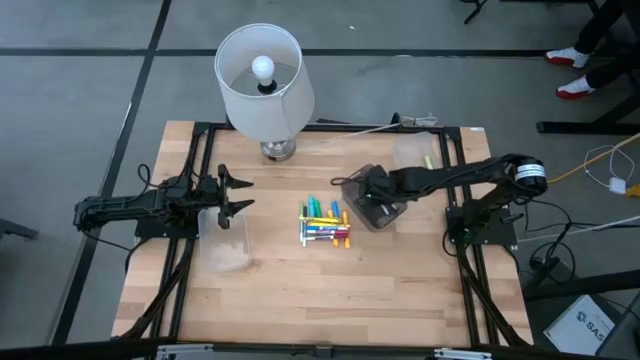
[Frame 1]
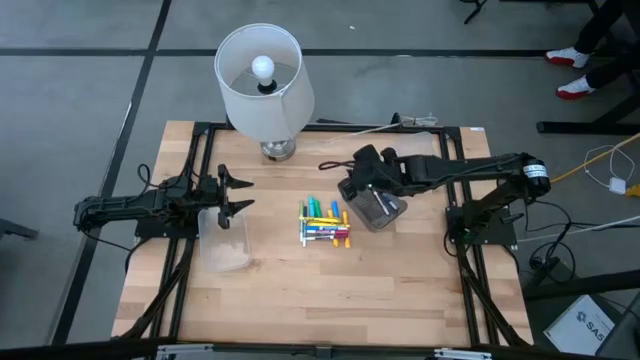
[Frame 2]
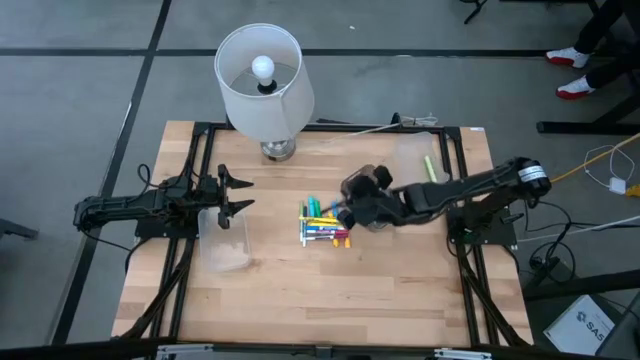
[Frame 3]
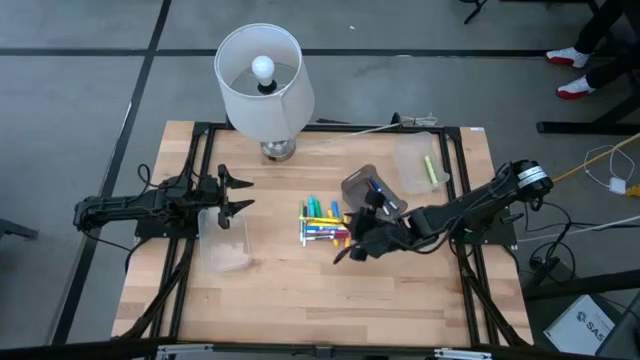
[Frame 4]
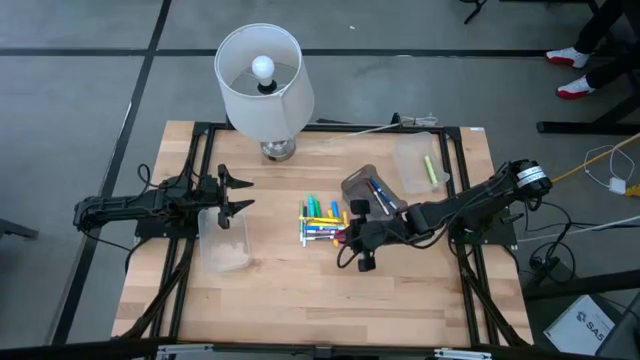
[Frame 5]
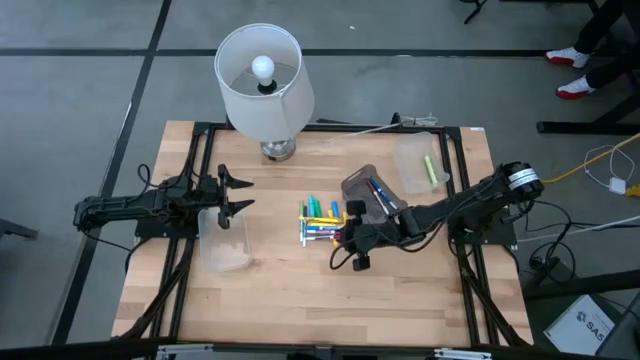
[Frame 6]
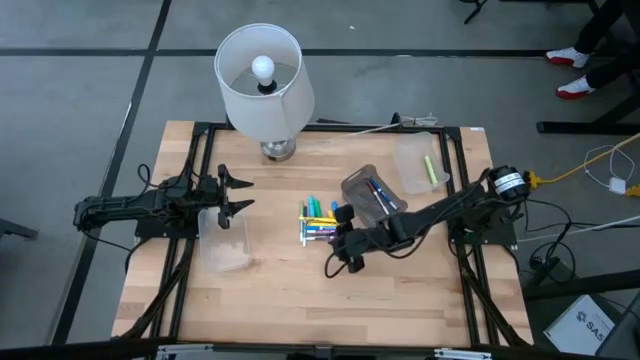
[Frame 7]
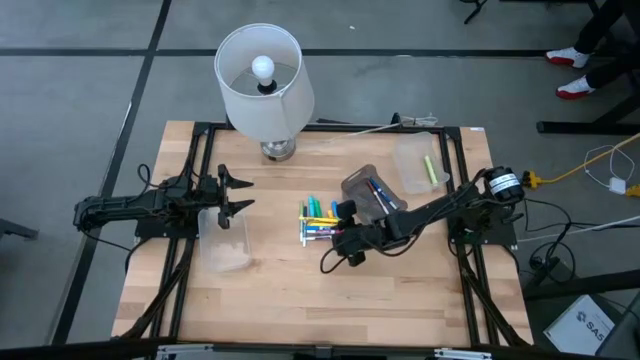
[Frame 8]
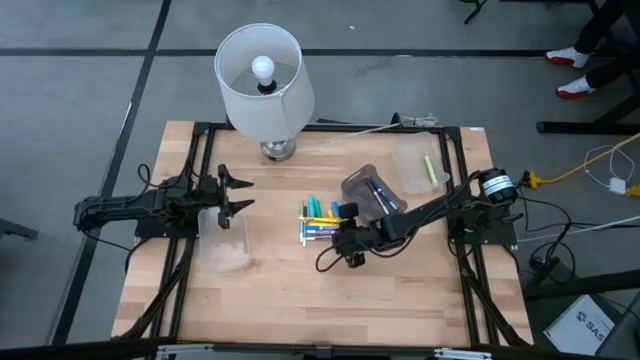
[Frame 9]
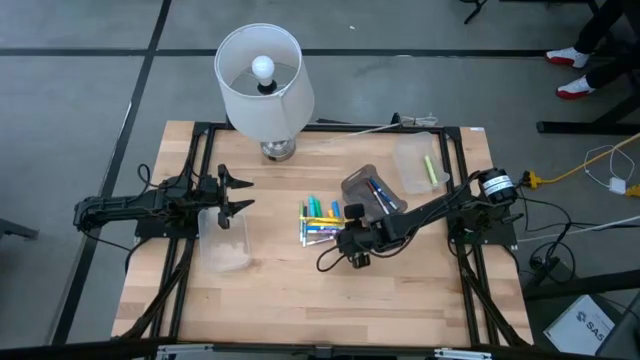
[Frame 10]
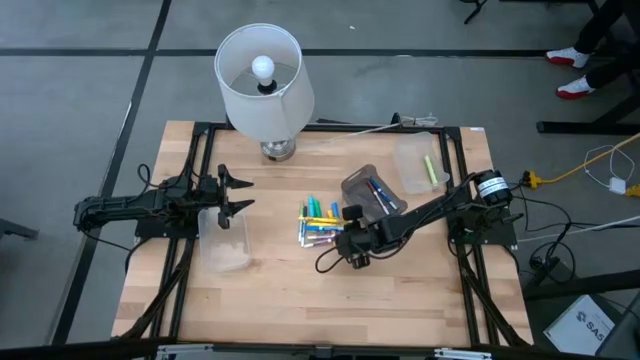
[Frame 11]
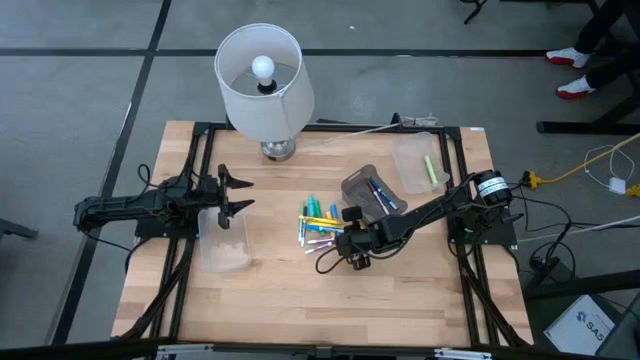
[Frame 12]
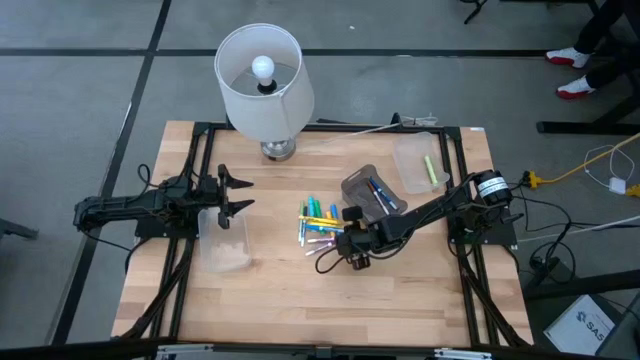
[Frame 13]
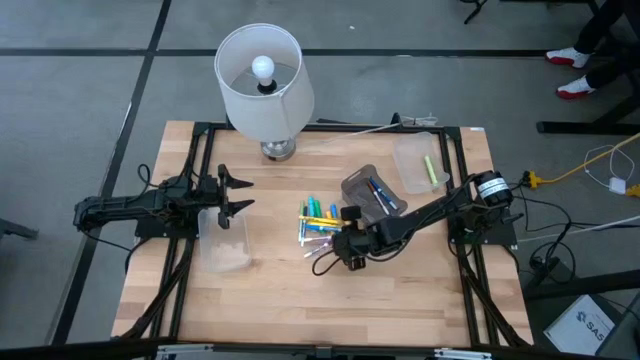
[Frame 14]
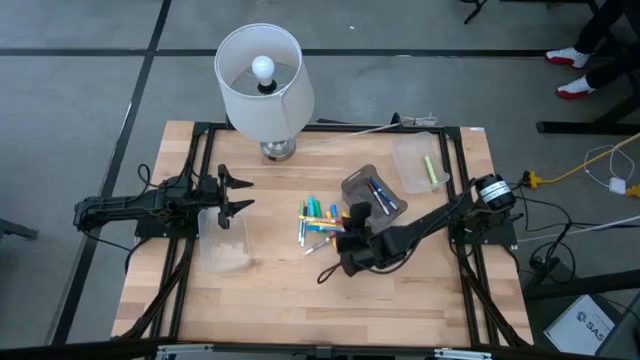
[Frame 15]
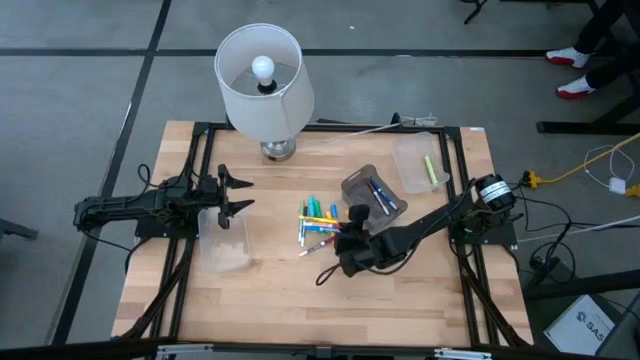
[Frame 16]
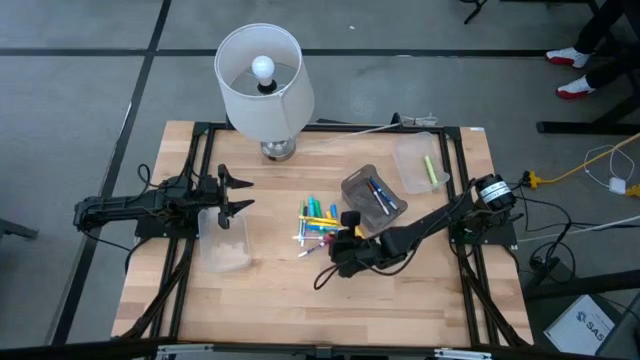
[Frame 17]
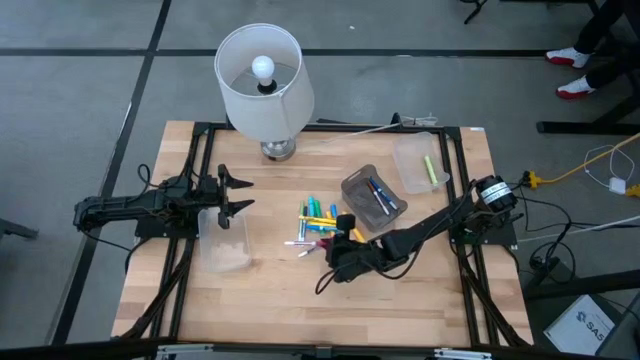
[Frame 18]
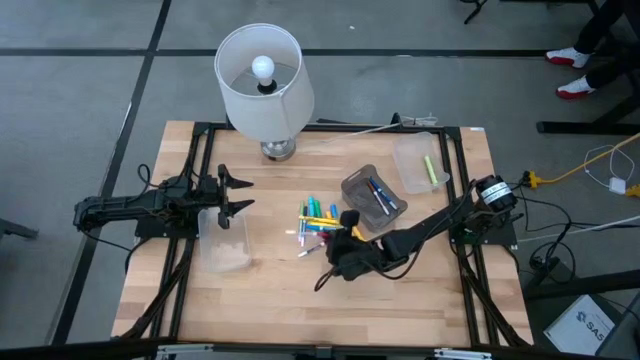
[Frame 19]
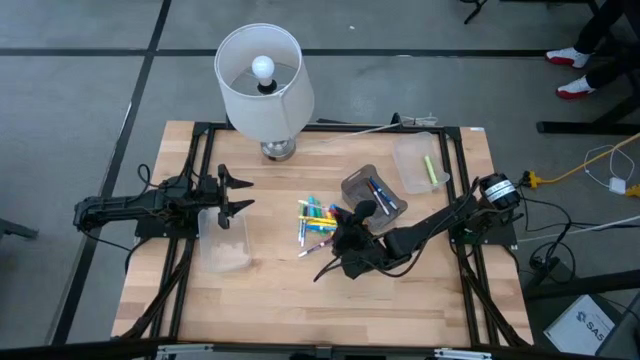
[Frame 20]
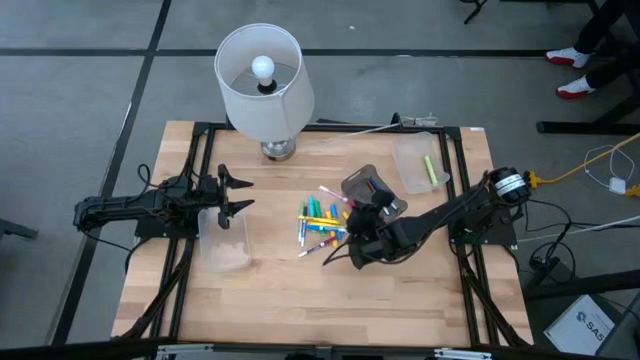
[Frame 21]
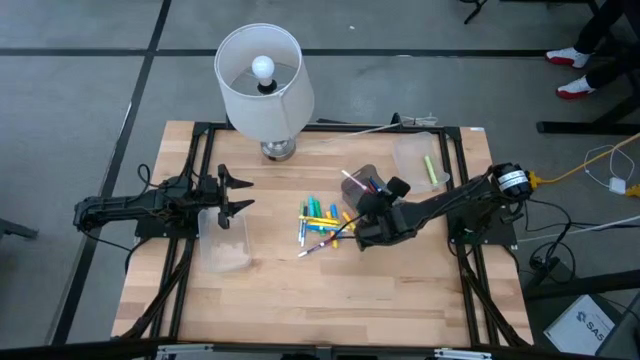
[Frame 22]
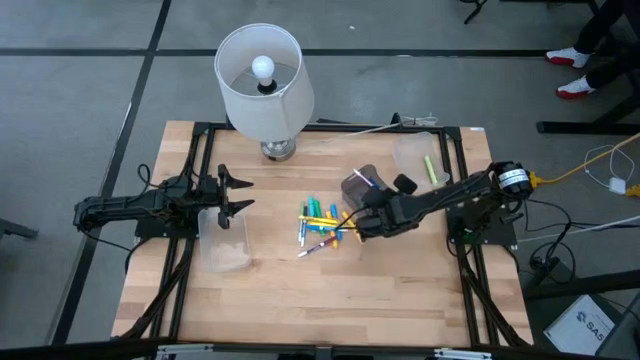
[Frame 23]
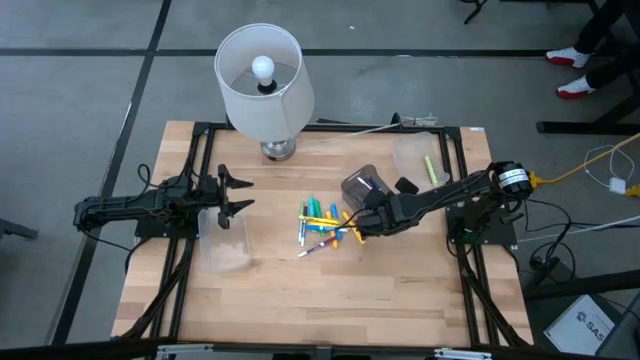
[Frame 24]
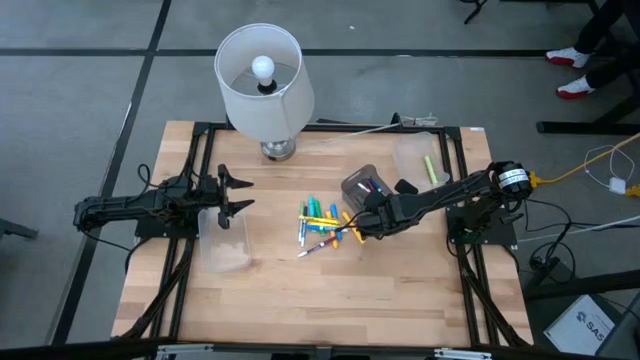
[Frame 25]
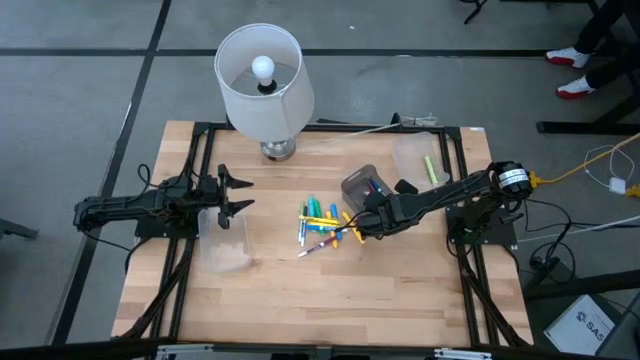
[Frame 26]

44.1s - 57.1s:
Task: Pick & Place Markers
Put the pink marker pen into the black bin

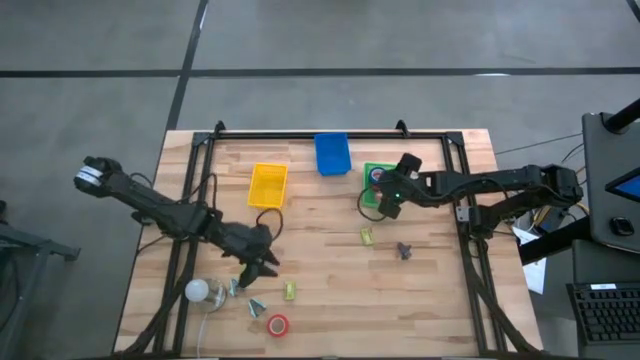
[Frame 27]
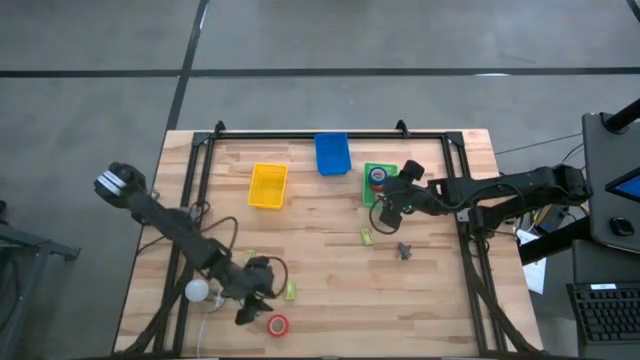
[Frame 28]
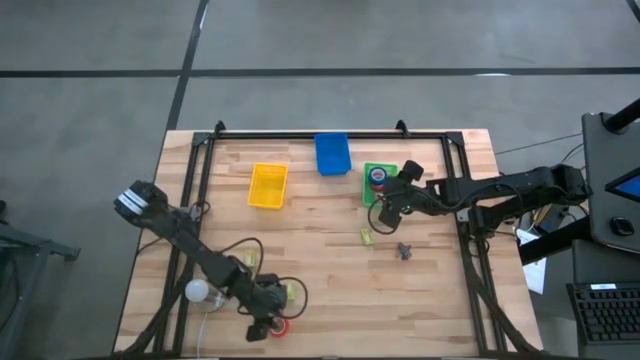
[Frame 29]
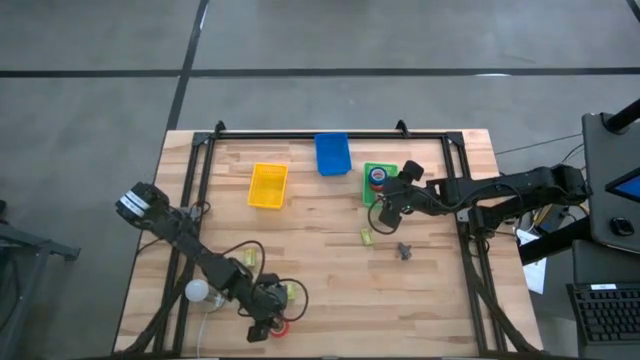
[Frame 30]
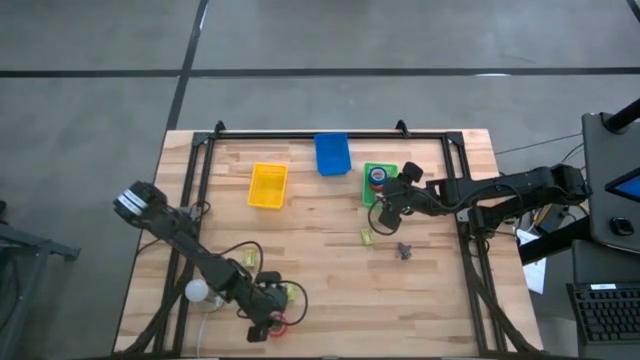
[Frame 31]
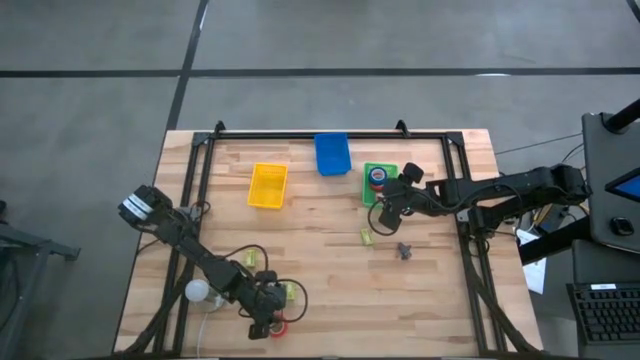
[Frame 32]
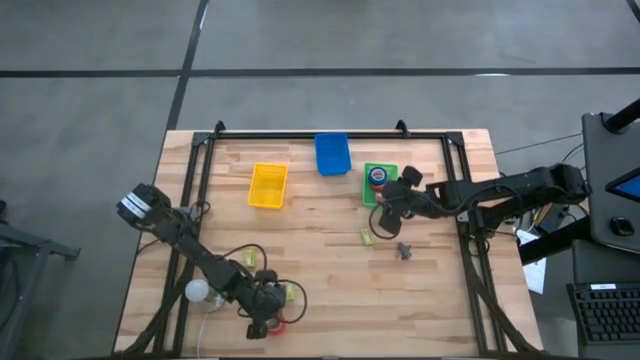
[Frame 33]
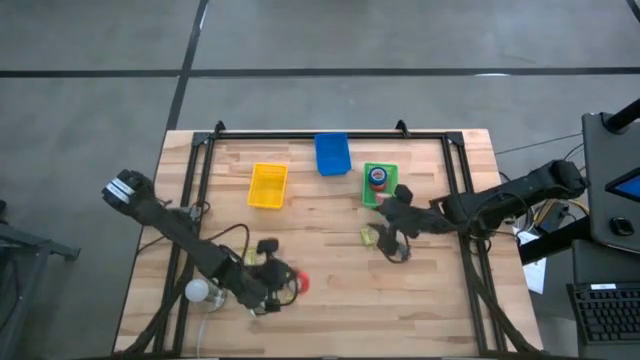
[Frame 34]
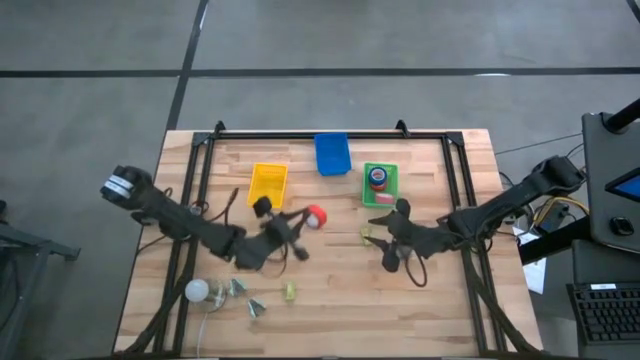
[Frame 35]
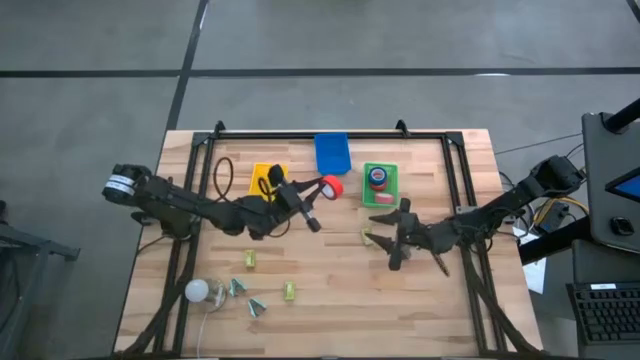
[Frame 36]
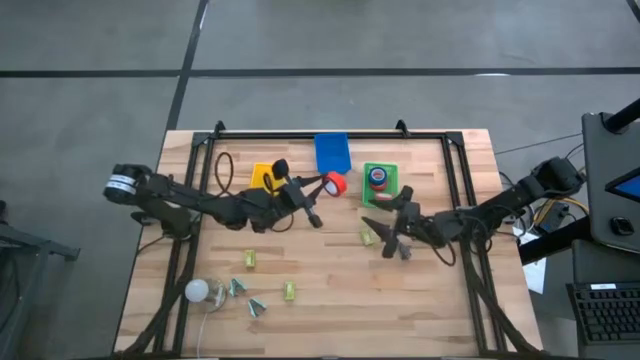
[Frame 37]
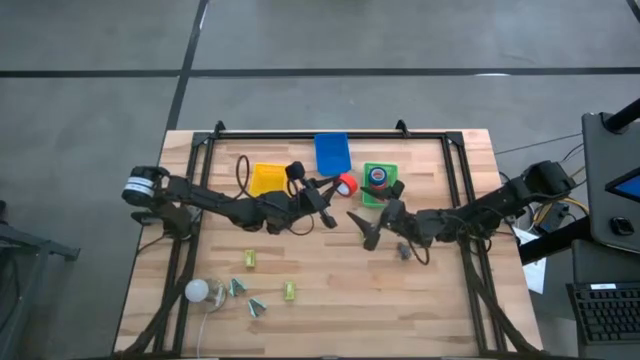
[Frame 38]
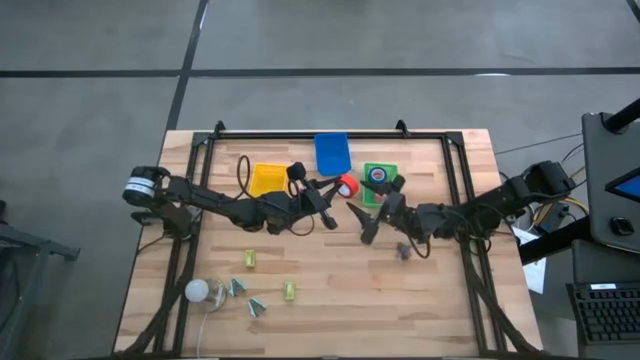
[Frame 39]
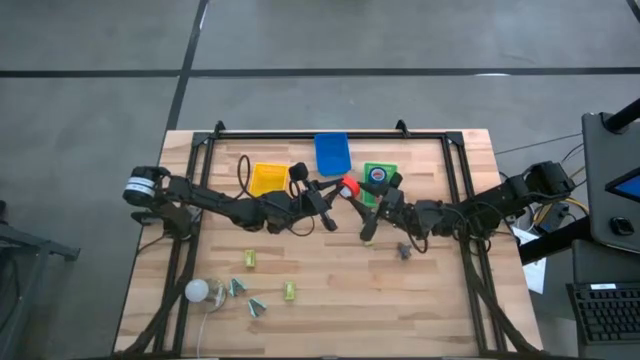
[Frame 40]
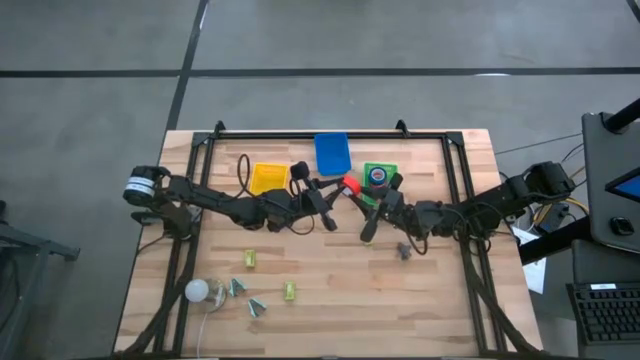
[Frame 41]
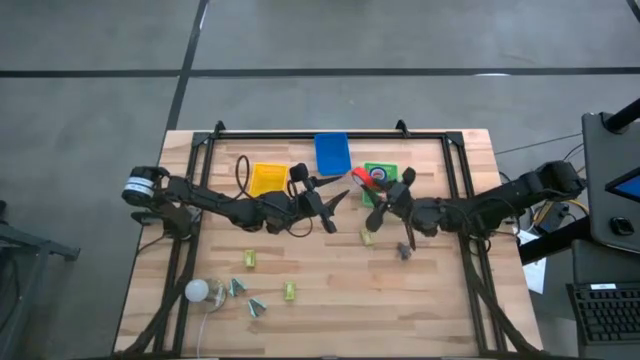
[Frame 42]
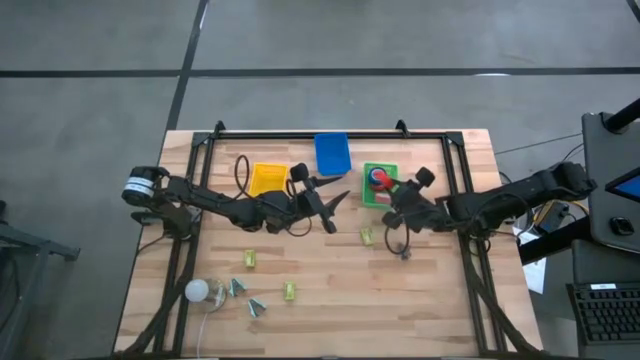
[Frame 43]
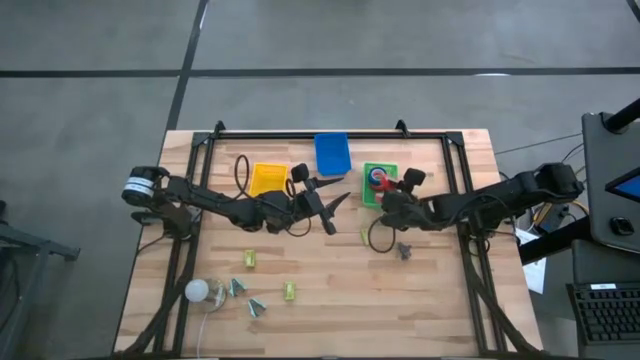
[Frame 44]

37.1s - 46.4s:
Task: Pick and place Stapler, Stapler remover, tape
Put the red tape into the green basket
